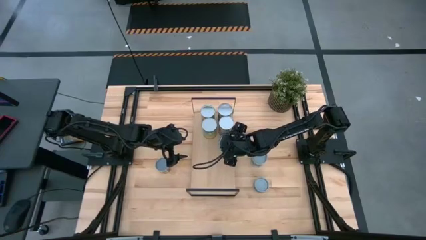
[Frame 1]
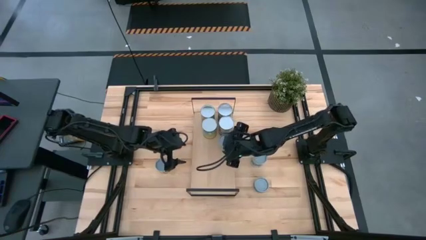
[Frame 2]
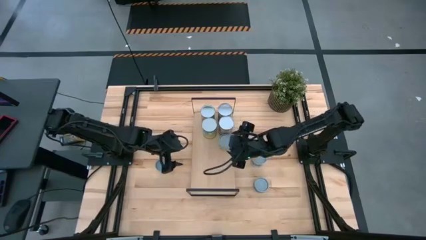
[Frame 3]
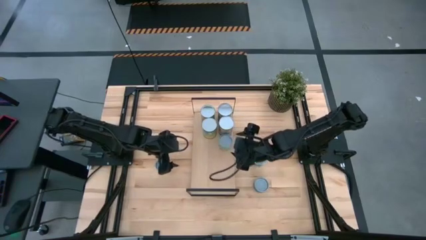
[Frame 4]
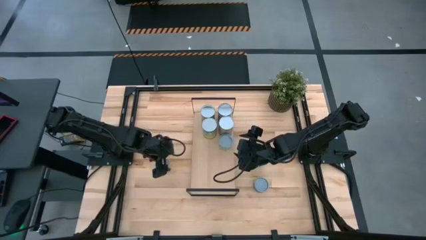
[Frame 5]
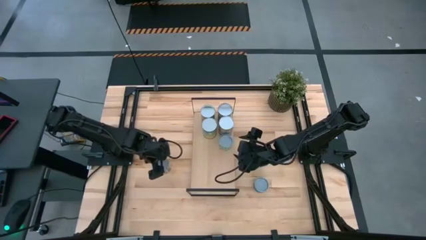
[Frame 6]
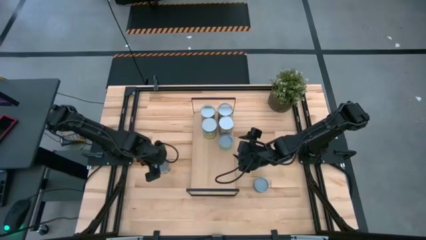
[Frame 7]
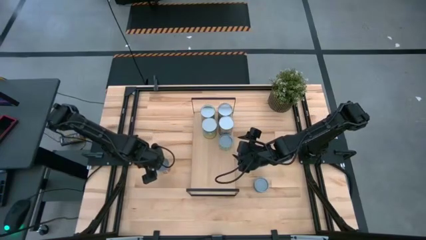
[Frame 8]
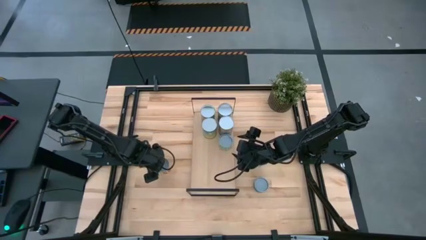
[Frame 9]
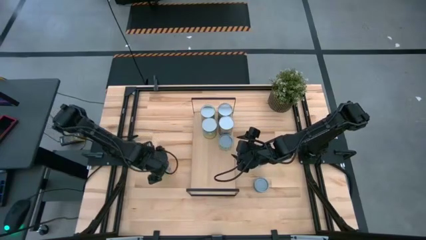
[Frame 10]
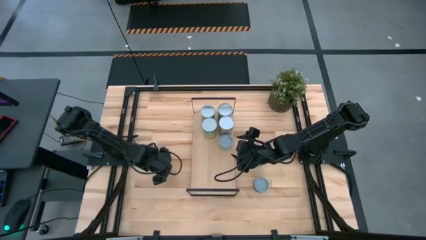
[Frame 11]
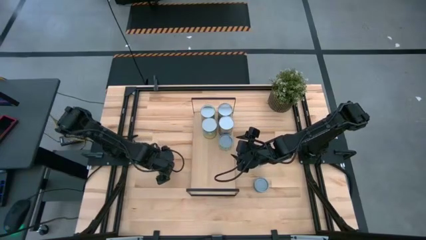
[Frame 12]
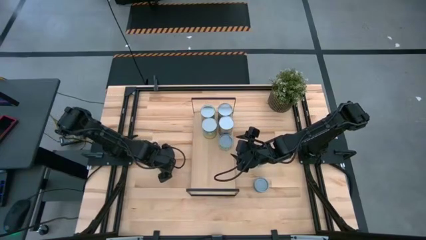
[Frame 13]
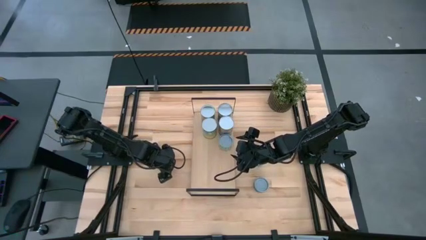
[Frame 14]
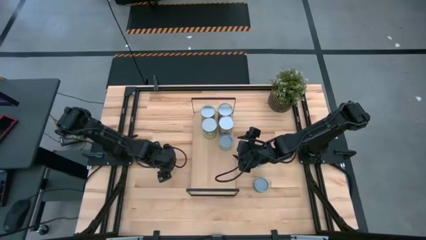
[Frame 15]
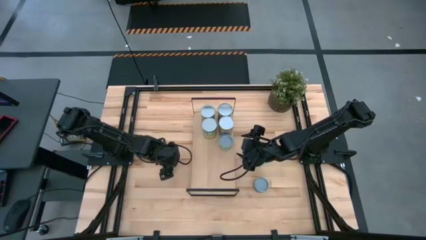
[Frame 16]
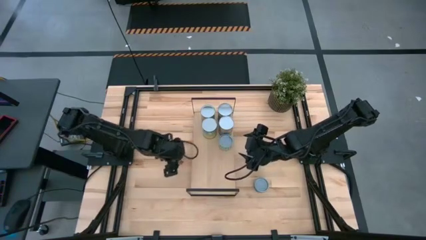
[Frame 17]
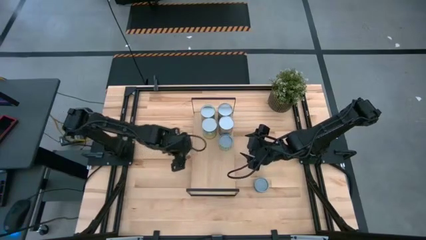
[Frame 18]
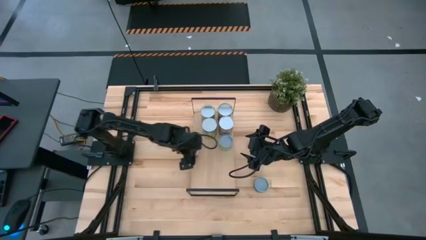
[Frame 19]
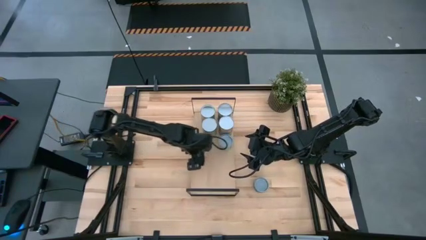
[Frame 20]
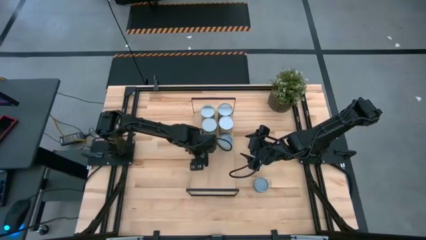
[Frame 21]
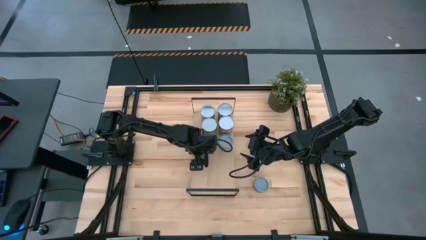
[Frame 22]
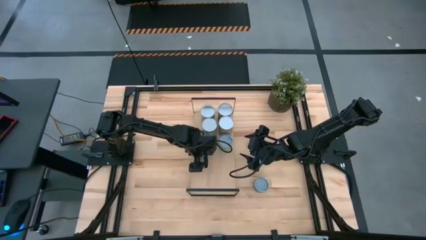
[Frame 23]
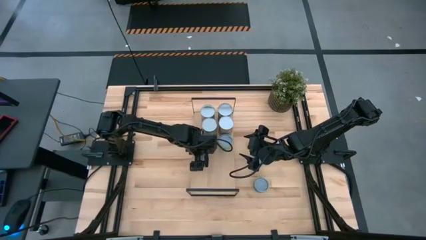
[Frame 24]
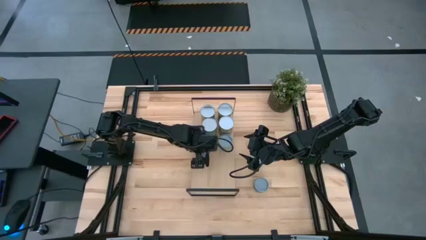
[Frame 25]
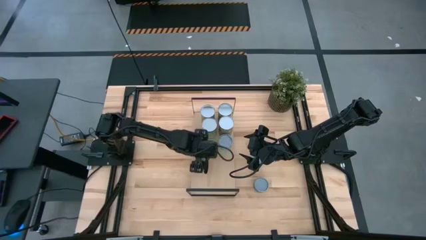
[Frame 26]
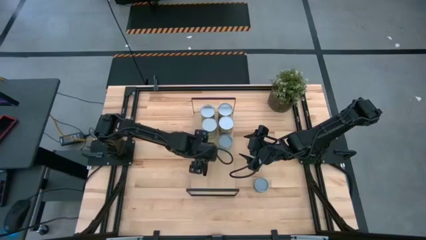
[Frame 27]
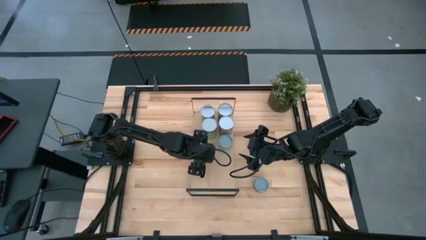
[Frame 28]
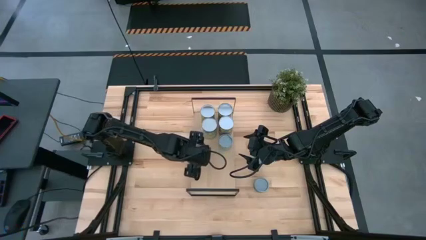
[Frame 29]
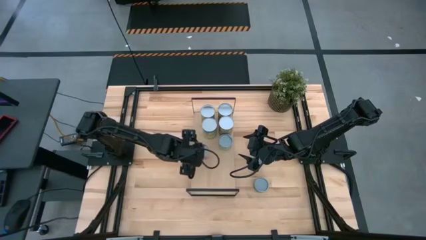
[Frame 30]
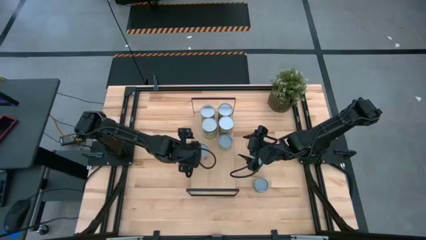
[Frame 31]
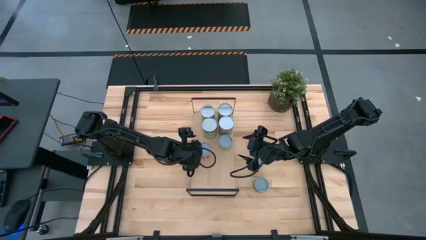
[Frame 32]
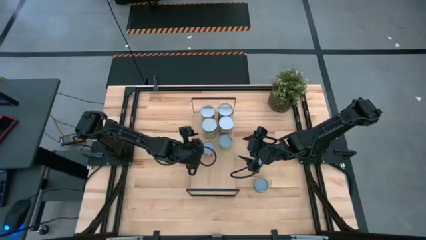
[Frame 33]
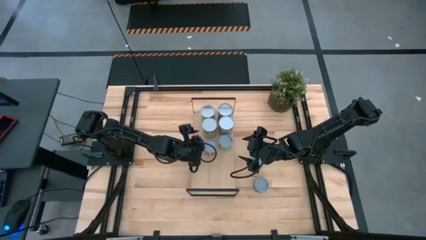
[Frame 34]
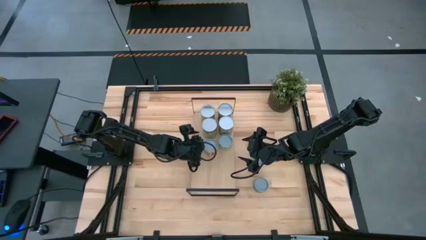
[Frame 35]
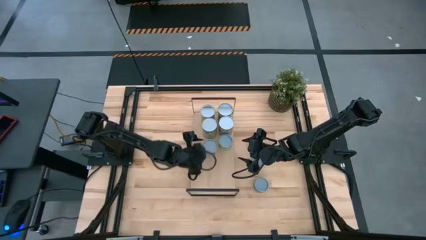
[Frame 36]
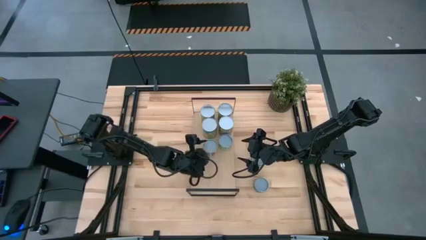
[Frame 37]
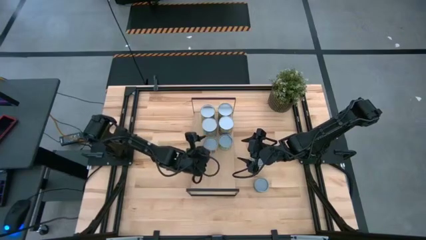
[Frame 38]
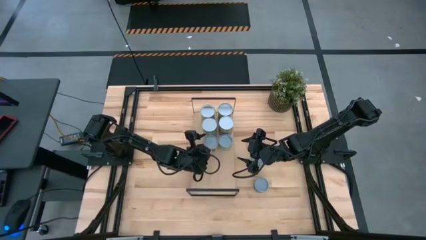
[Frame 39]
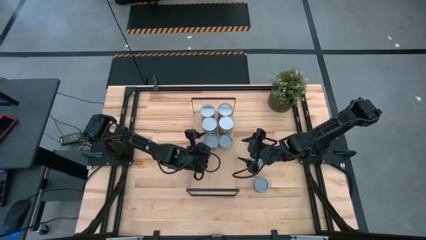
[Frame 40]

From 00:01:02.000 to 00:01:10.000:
Task: Pick and place cans onto a shelf
Put the canned tomato on the shelf

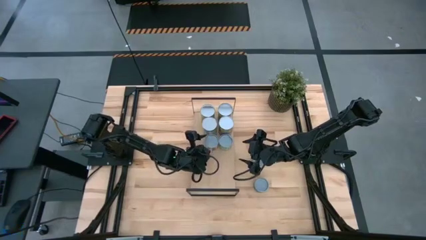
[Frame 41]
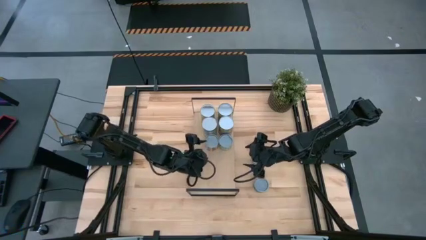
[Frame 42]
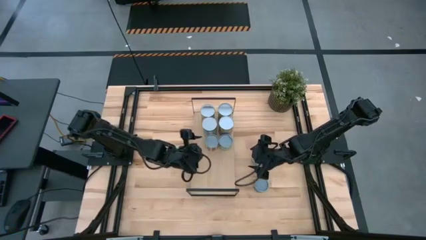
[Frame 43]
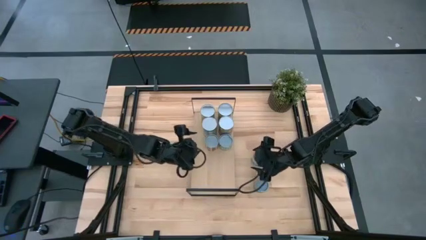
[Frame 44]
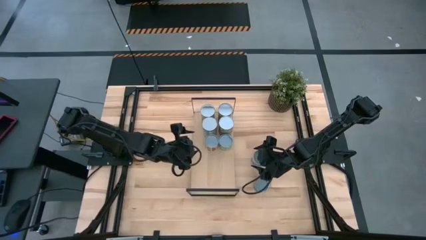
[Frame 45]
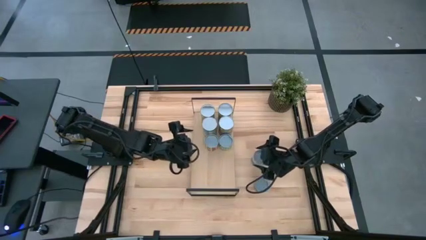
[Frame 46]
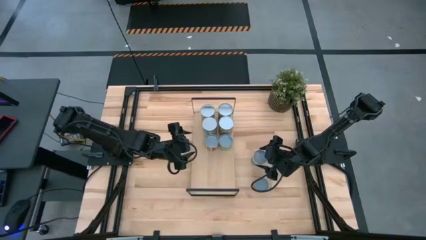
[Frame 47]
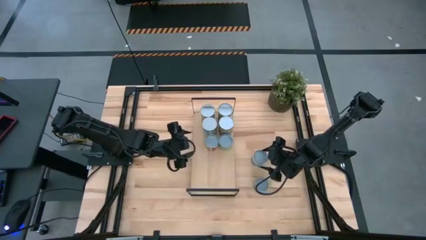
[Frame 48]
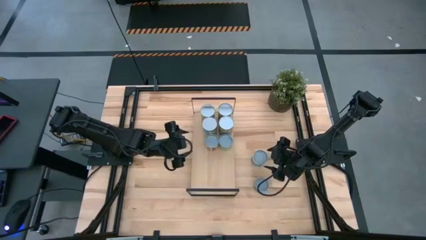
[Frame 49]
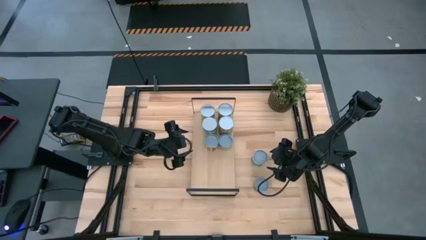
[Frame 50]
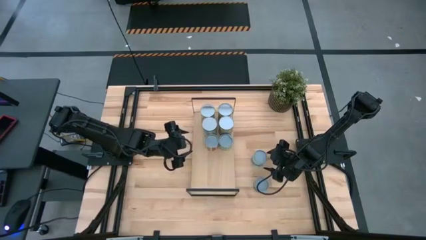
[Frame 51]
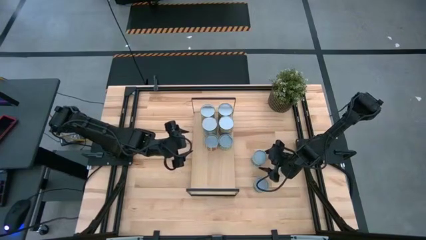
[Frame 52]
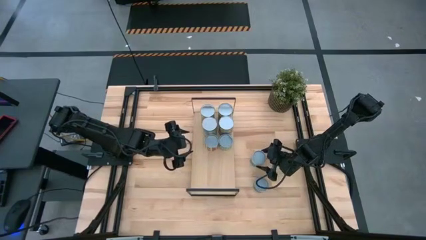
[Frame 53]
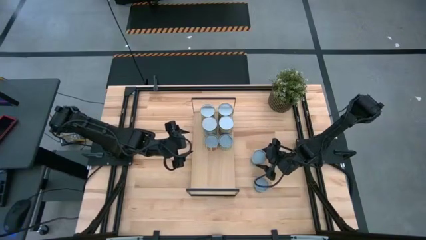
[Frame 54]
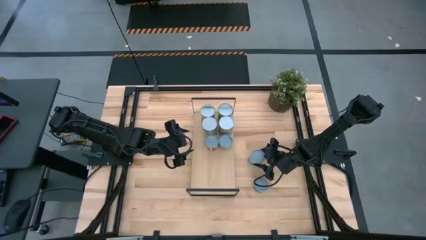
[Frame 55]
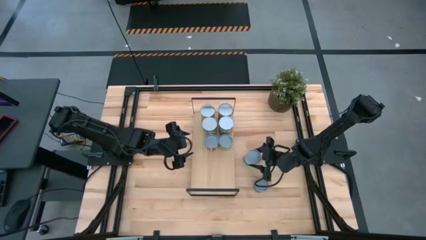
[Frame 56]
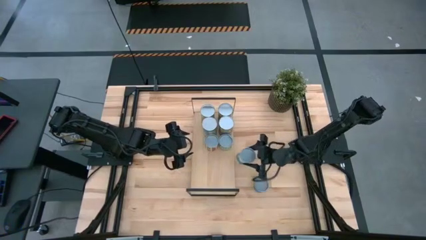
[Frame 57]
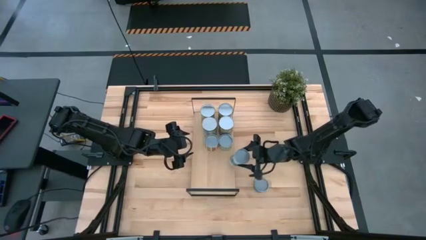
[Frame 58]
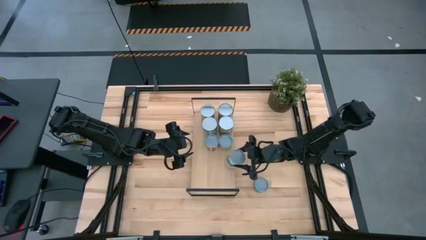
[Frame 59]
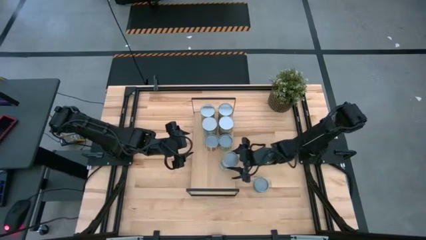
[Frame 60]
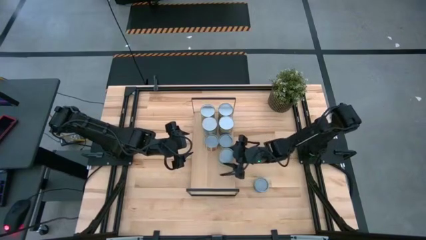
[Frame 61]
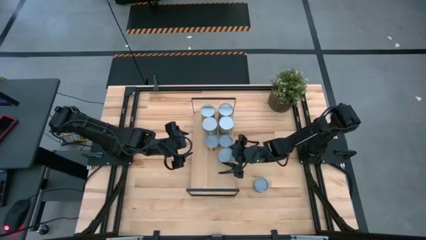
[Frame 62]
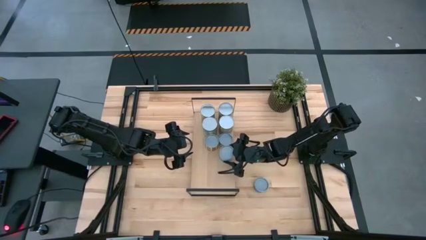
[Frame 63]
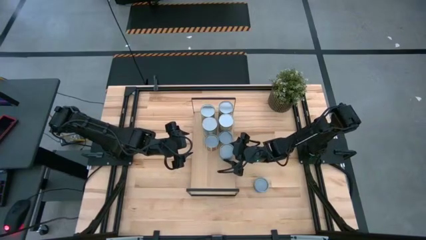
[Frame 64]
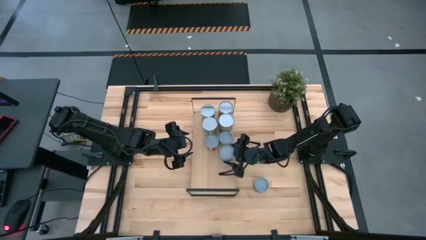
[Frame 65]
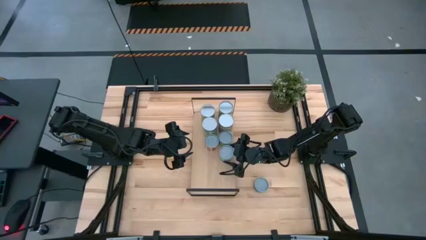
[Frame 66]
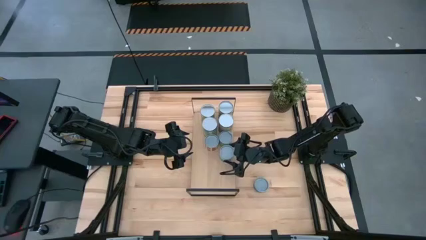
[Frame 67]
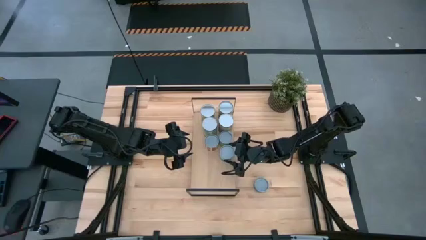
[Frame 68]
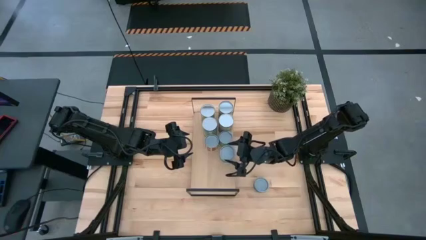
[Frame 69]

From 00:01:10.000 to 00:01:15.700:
Put the canned mixed vegetable on the shelf
